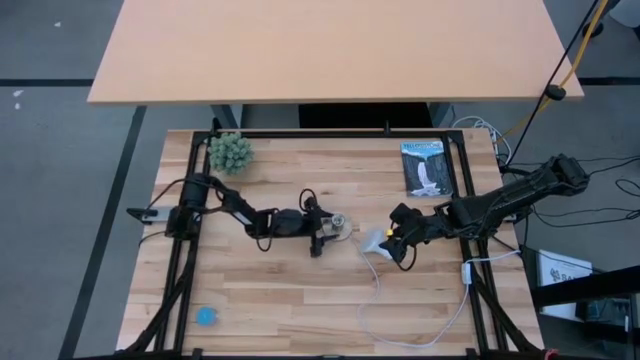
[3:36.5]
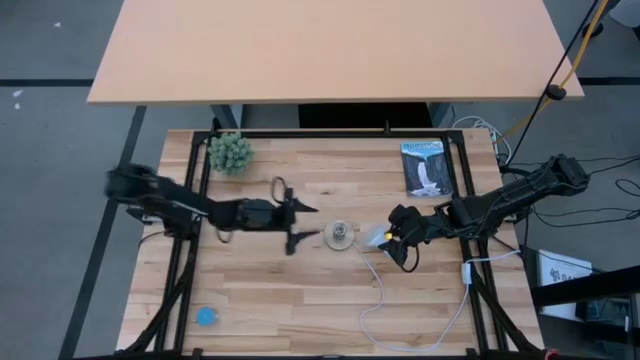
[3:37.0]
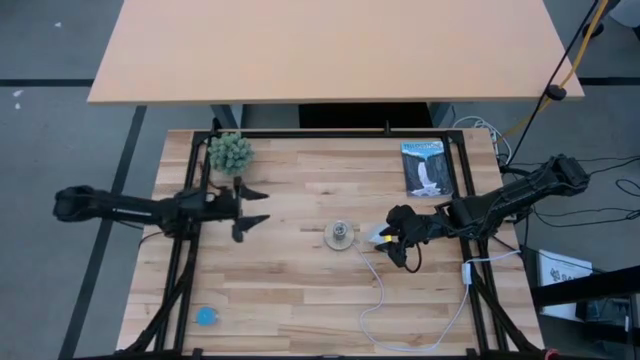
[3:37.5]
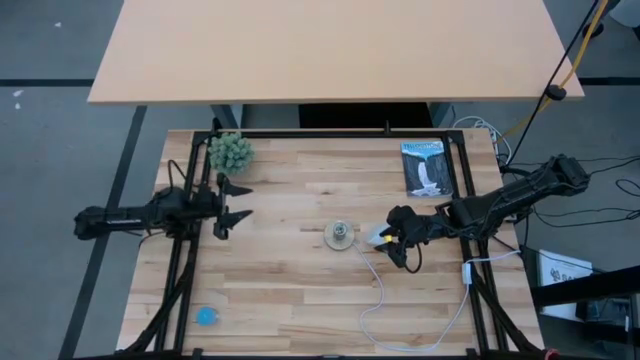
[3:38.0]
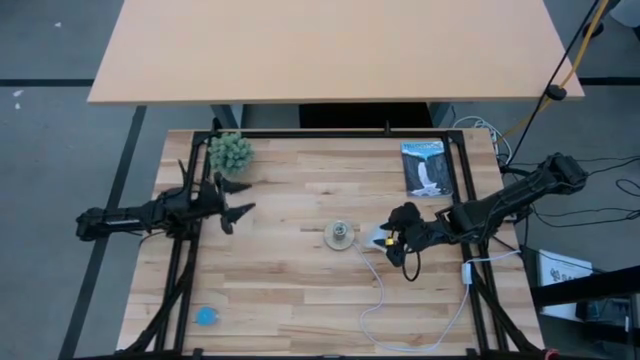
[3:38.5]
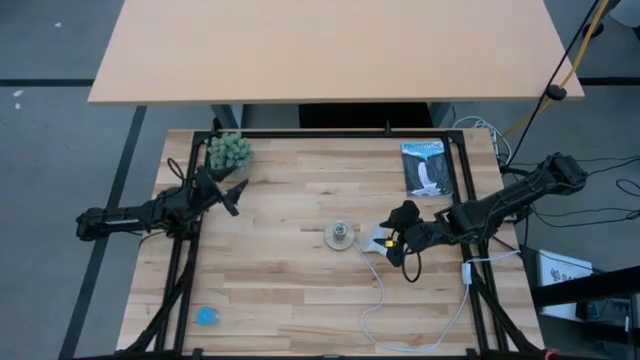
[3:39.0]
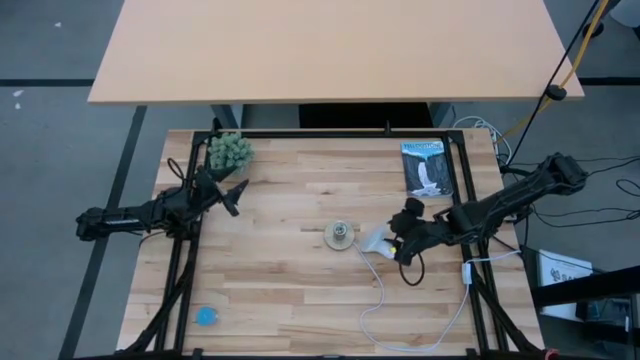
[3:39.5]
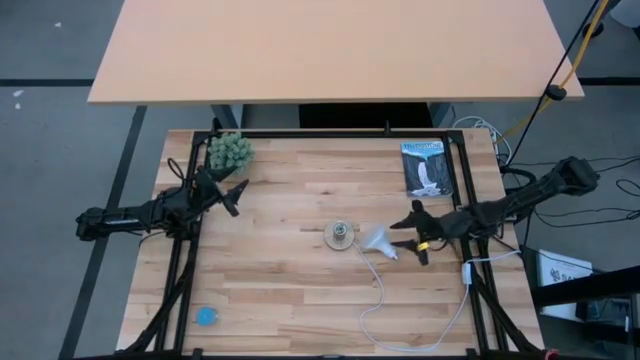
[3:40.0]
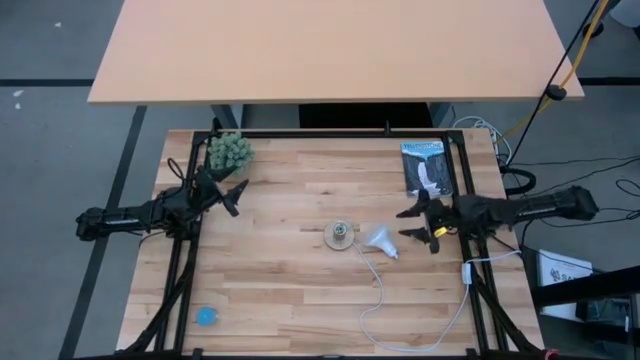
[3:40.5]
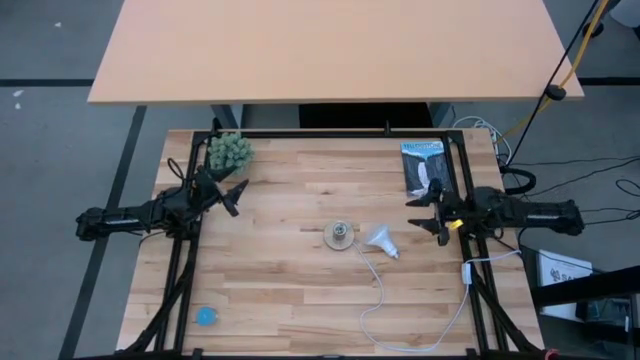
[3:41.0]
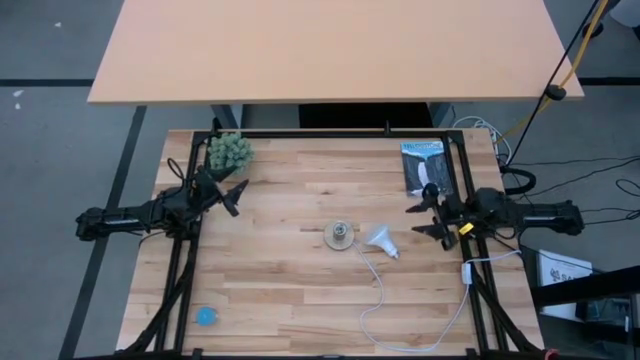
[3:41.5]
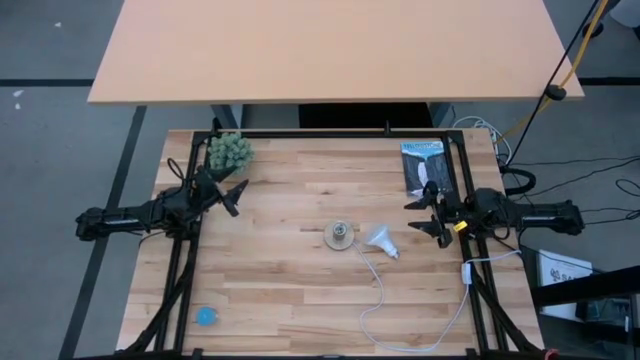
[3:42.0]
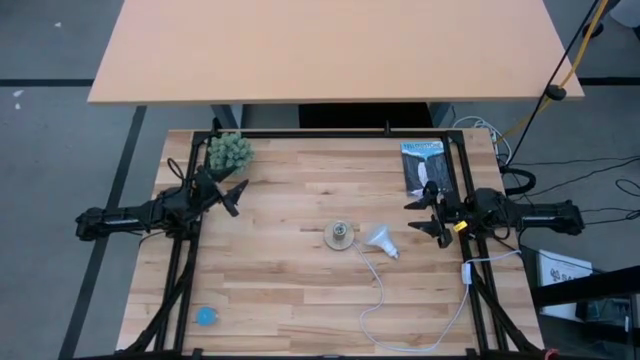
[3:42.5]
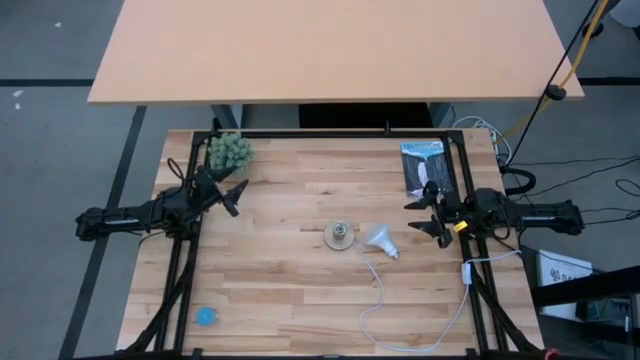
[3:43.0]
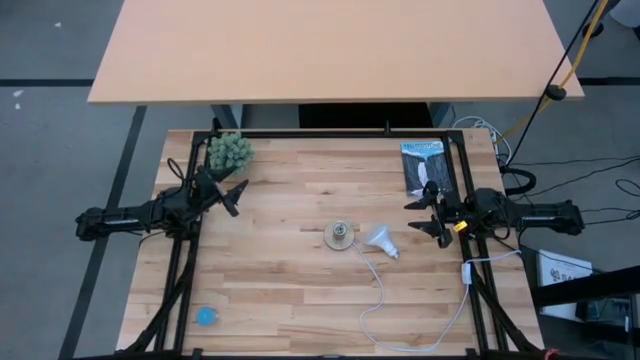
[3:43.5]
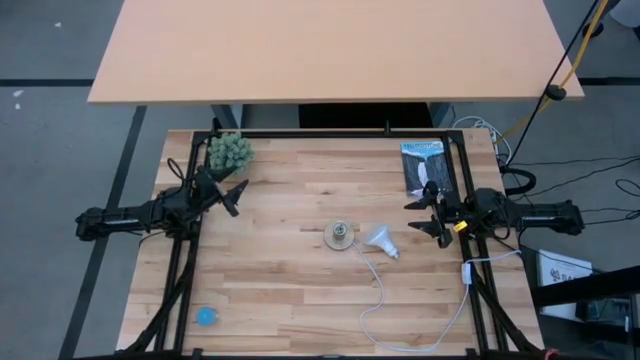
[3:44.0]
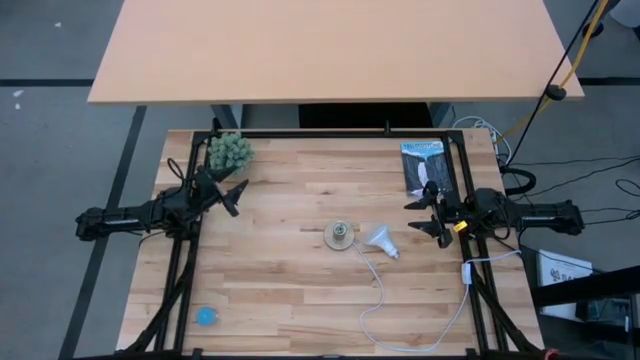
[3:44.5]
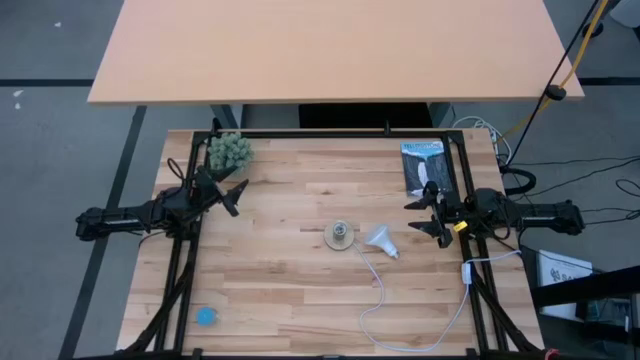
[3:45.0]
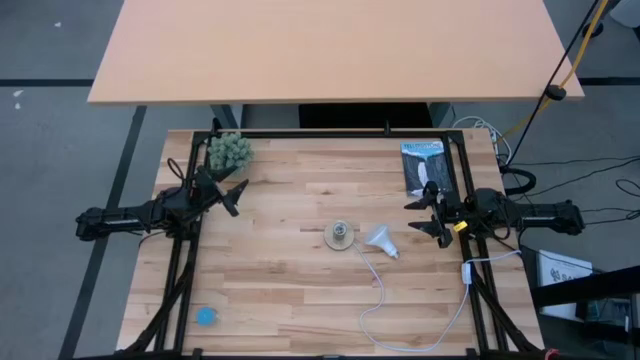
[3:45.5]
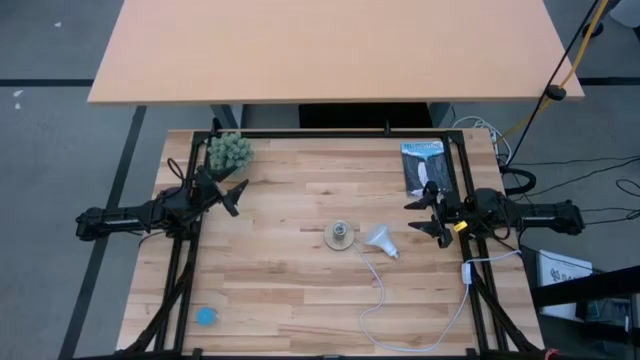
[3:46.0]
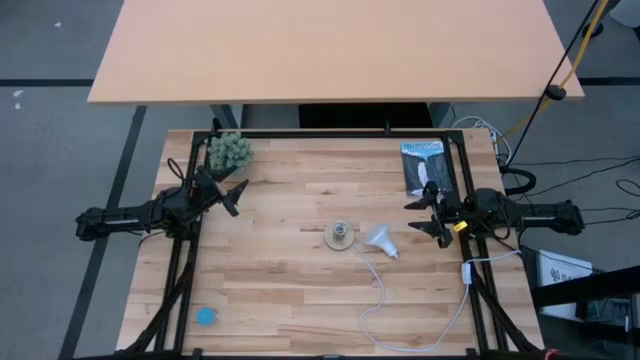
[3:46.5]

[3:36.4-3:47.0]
Task: Screw lightbulb
Return to Home Position

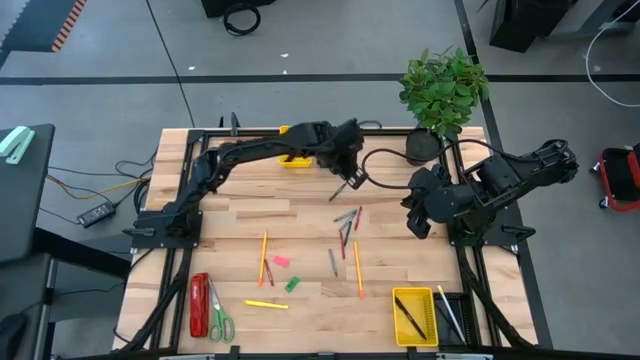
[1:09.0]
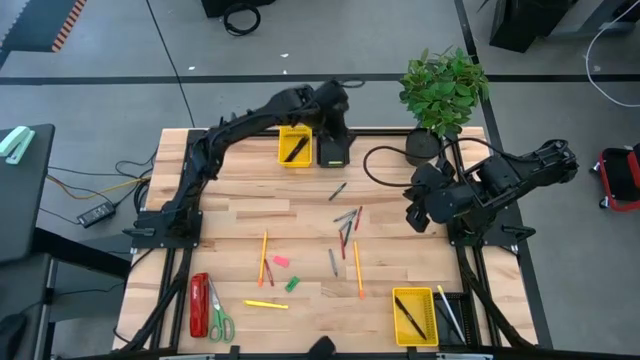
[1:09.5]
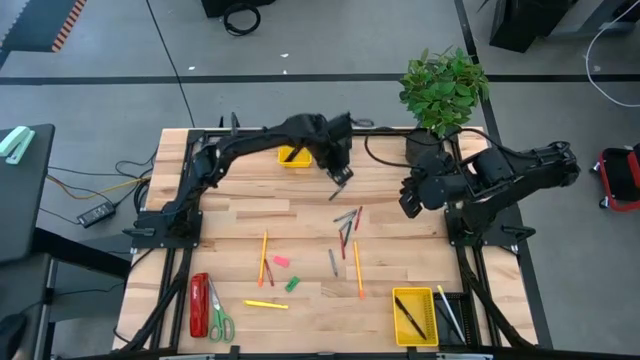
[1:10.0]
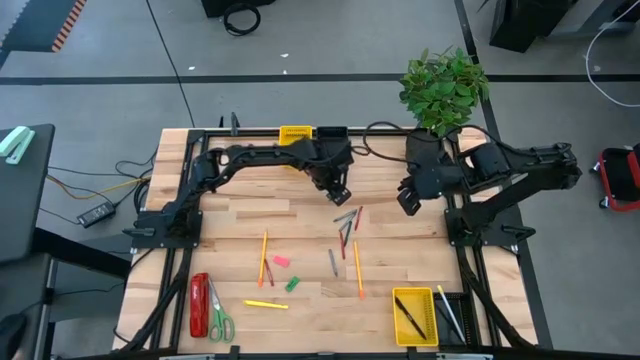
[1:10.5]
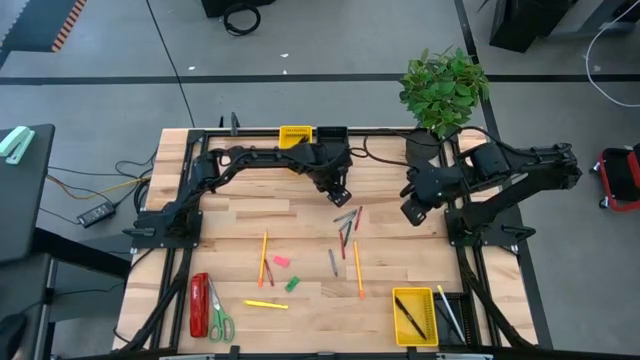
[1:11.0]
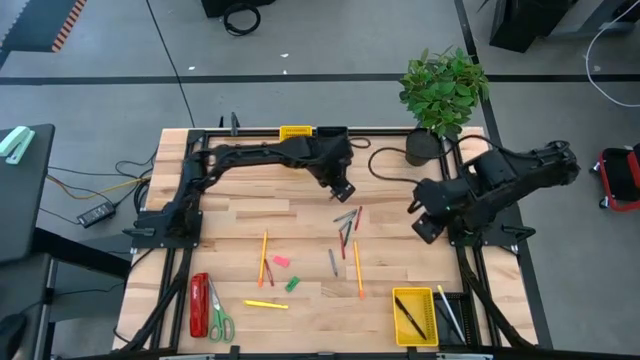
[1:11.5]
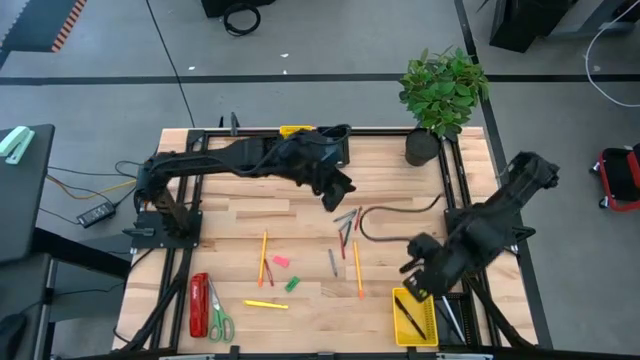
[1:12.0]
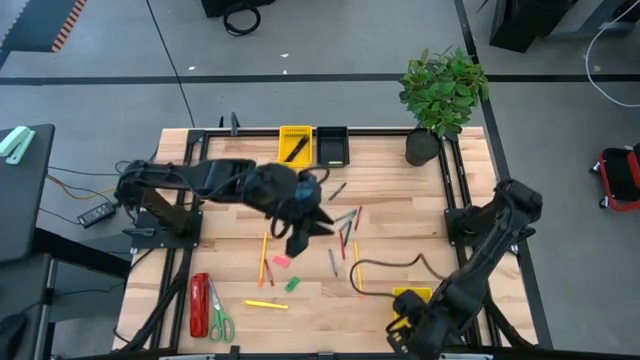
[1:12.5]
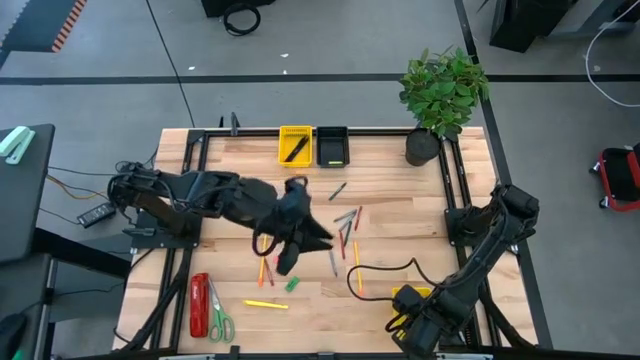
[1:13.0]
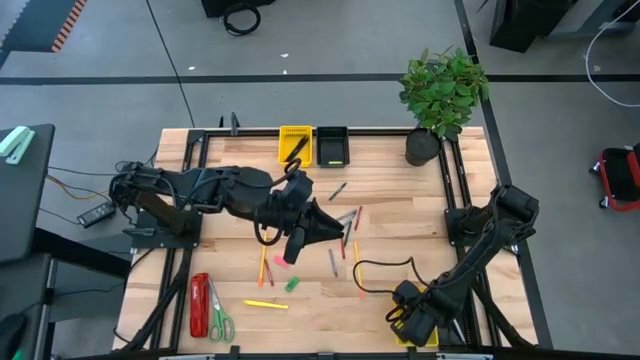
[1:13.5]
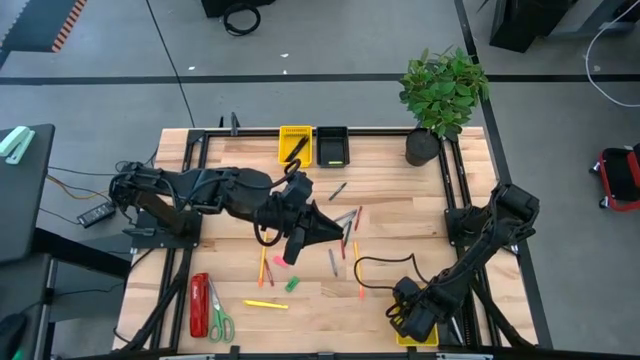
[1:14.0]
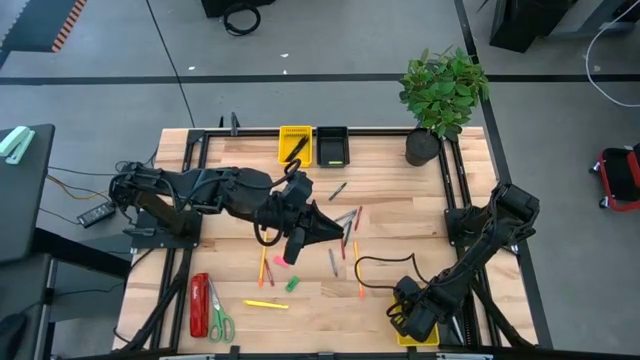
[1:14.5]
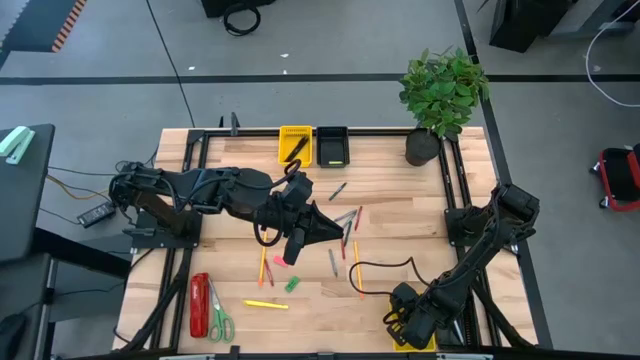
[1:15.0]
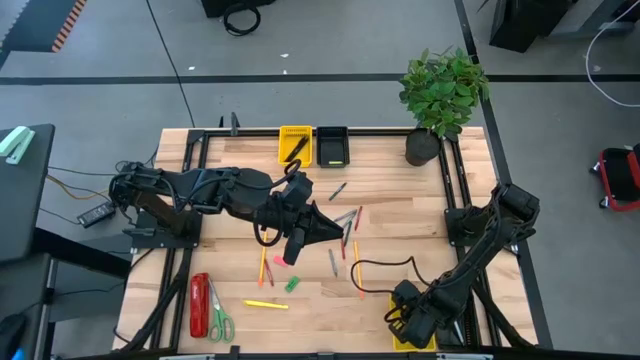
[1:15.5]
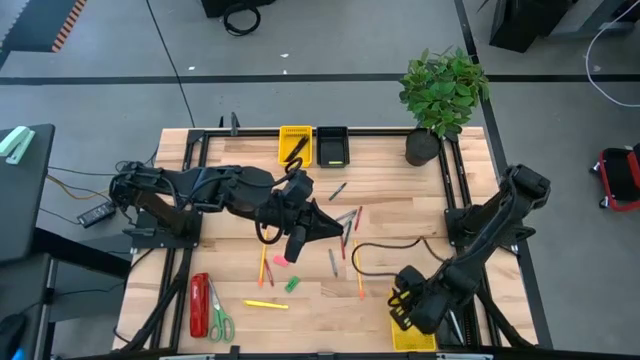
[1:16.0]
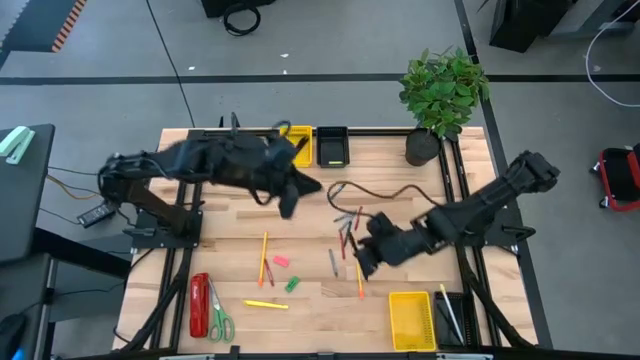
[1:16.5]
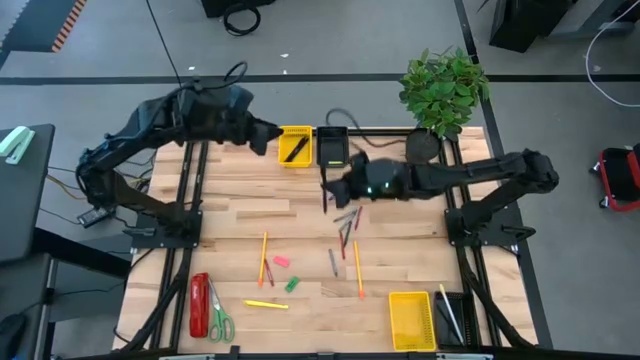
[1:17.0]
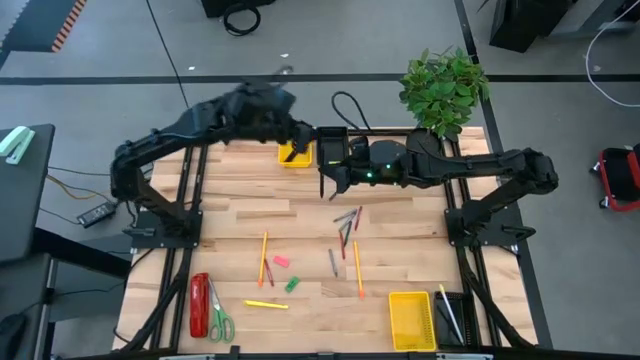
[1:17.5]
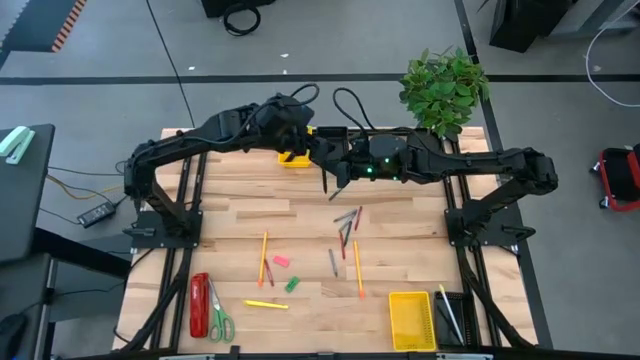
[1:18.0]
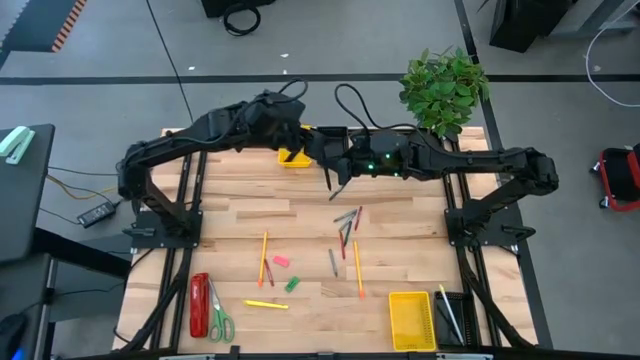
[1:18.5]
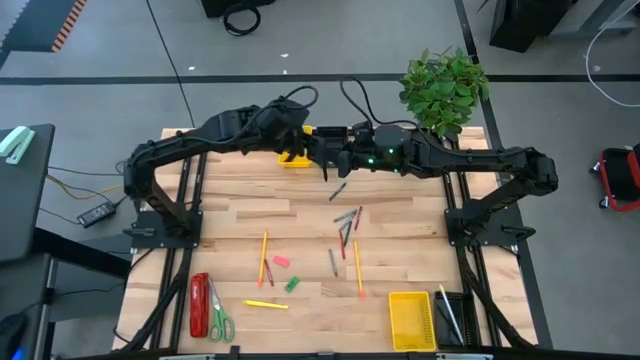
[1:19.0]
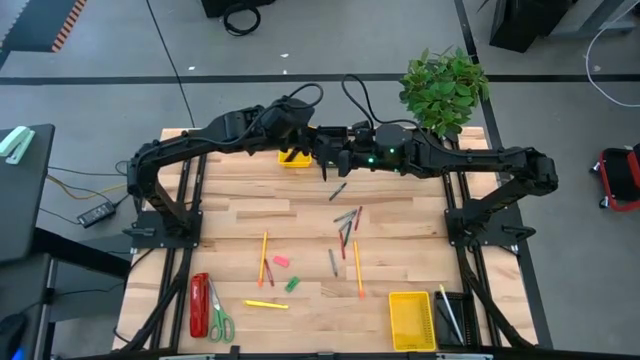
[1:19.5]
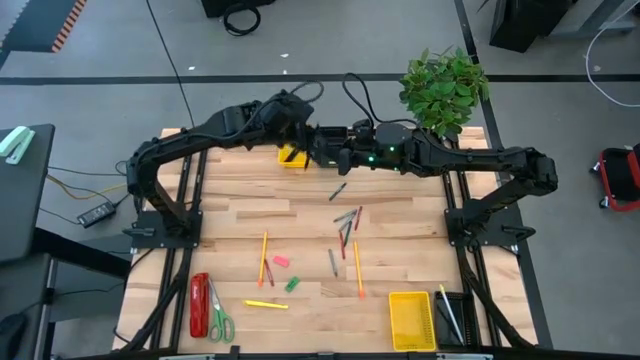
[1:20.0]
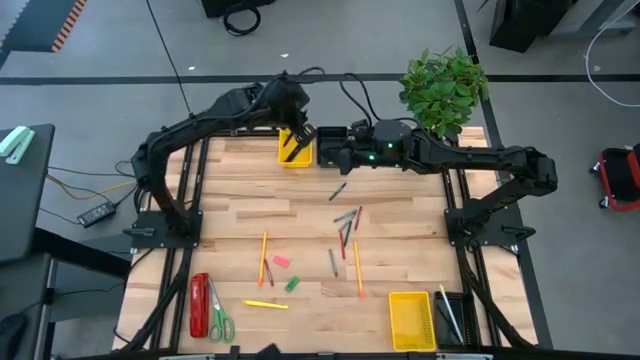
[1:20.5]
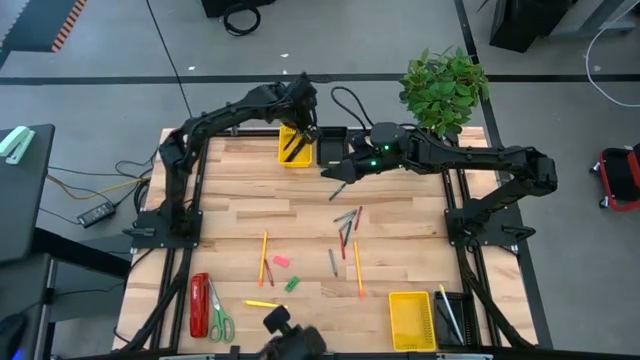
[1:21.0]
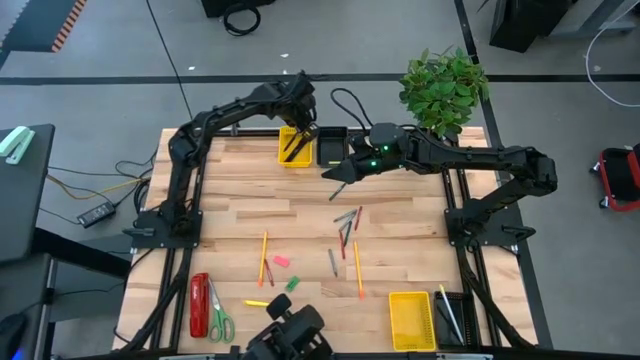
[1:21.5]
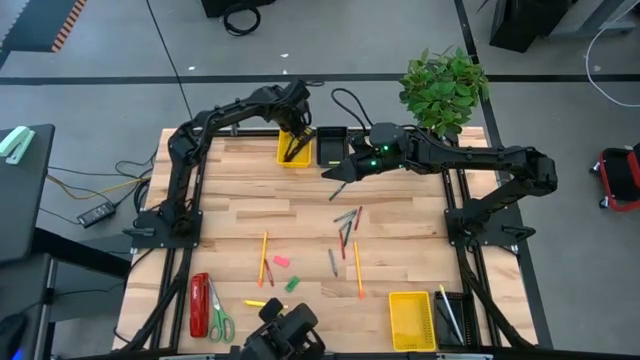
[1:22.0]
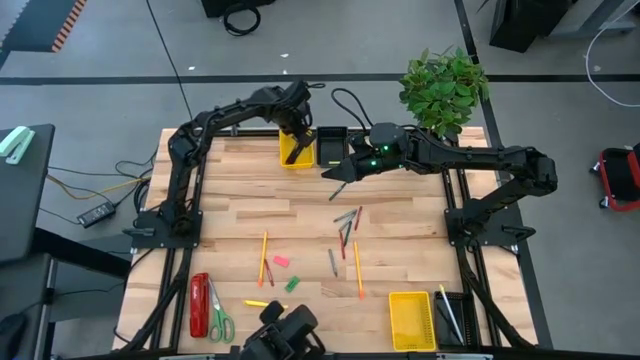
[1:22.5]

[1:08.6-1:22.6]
Task: Sort crayons/erasers/pens/pencils in bins
Move the black pen from the bottom yellow bin to the top yellow bin
